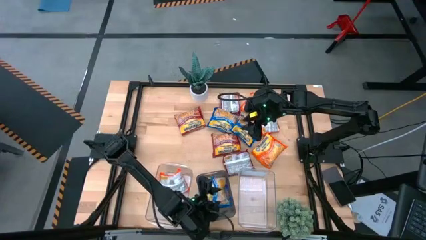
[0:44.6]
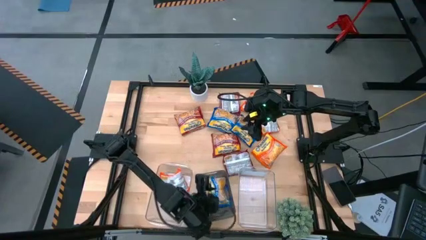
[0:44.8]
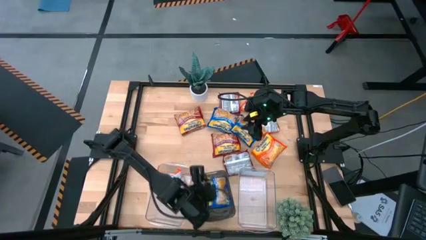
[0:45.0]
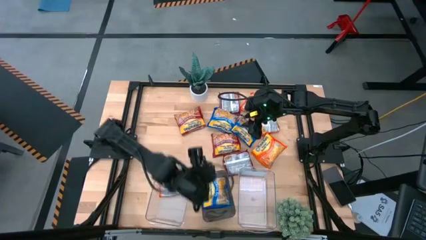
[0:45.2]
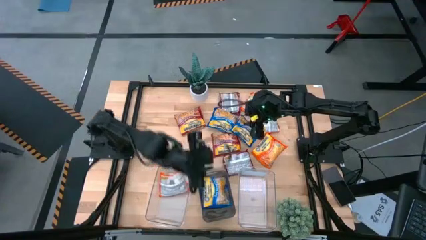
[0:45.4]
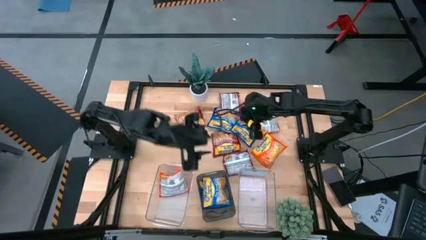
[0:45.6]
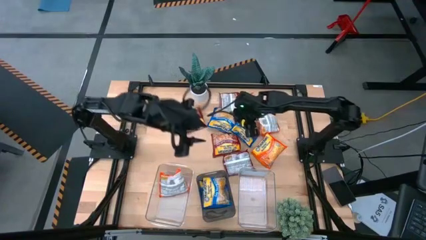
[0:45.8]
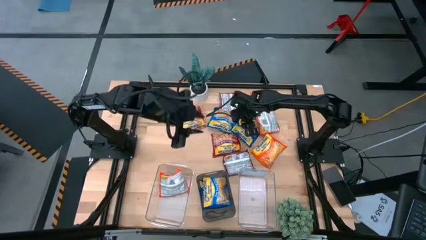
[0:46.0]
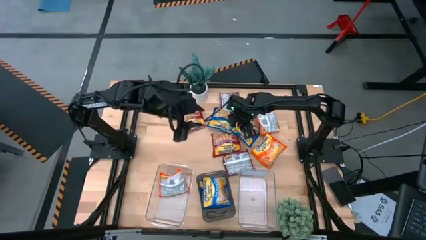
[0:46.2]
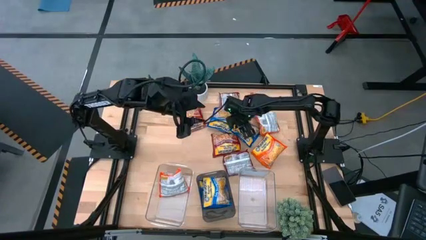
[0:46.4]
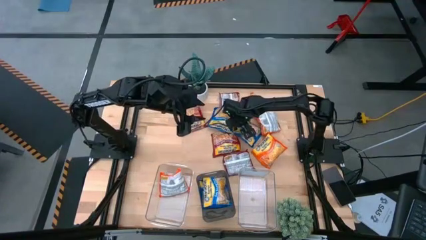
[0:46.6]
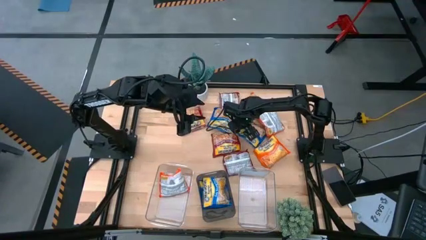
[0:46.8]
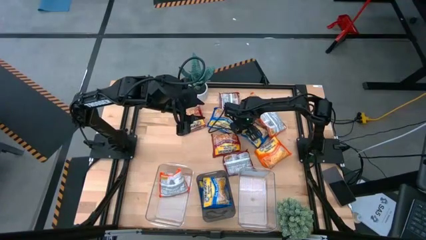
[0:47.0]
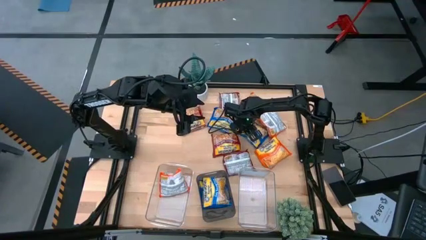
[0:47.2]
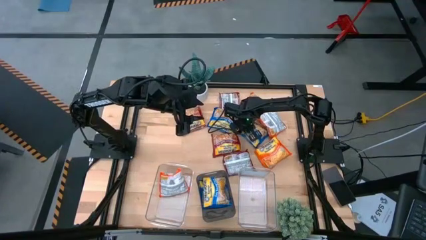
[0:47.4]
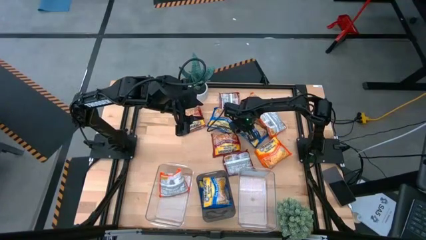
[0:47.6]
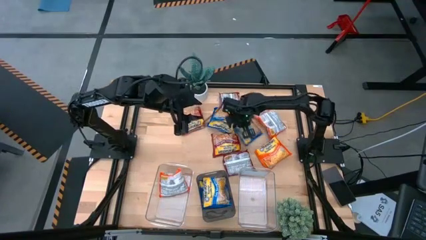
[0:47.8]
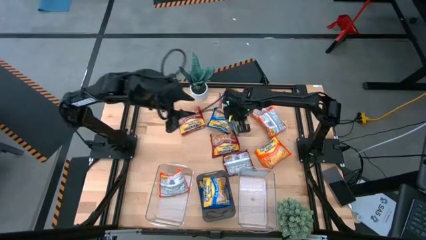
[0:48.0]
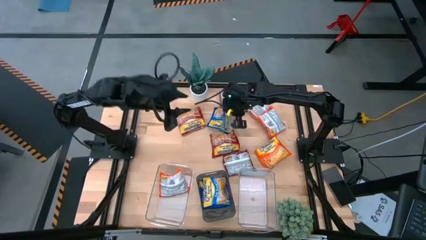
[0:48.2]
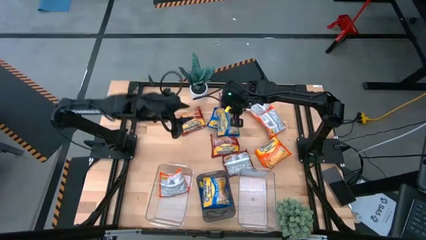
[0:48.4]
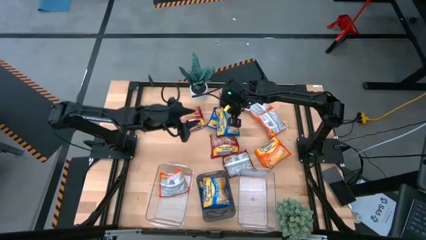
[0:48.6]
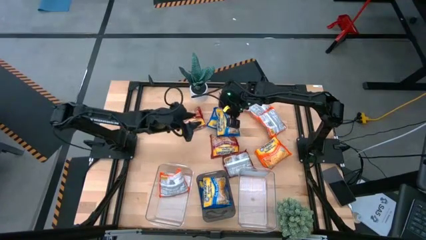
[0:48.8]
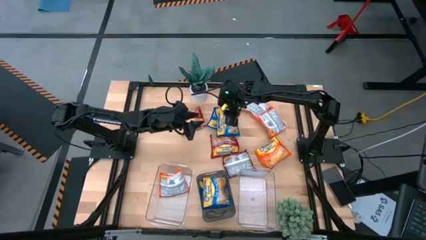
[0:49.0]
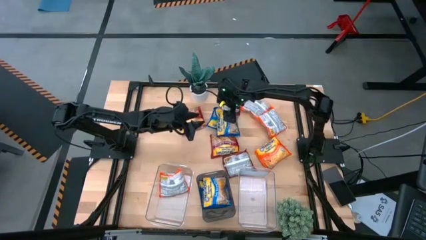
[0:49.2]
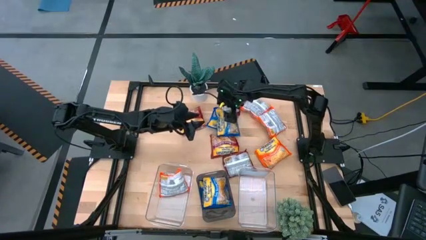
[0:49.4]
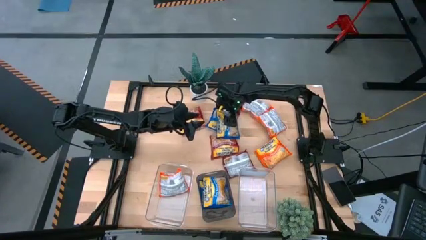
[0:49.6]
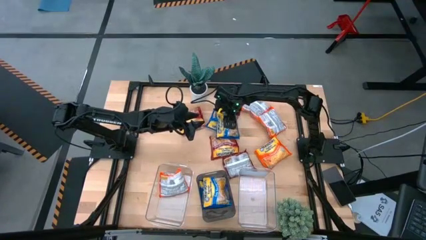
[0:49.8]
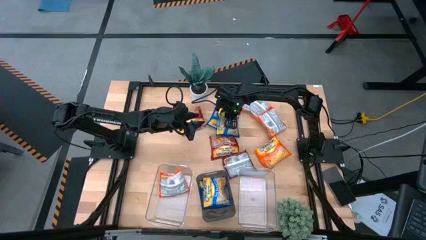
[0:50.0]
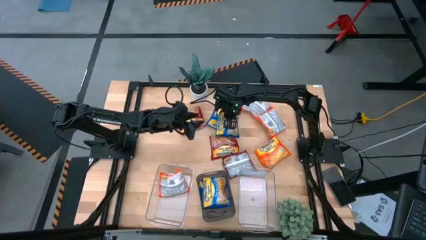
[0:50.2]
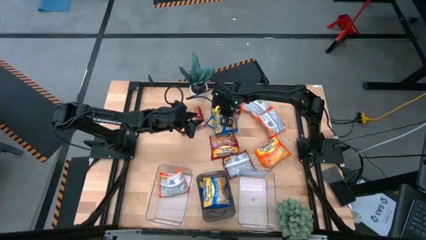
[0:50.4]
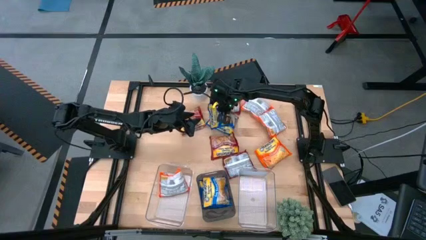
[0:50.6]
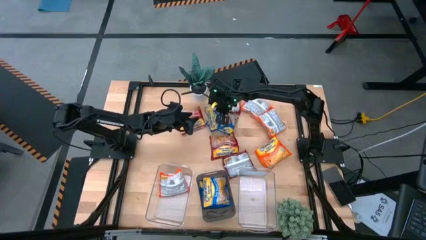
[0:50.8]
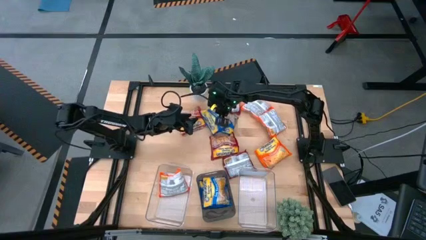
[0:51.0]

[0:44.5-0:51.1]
Task: Sort Maruchan noodles
Put the blue noodle pack into the black bin

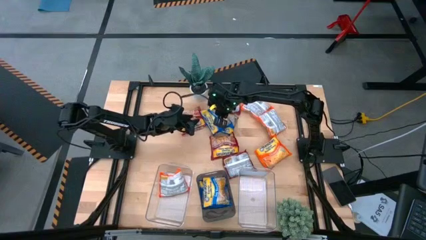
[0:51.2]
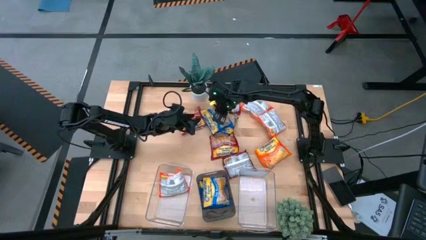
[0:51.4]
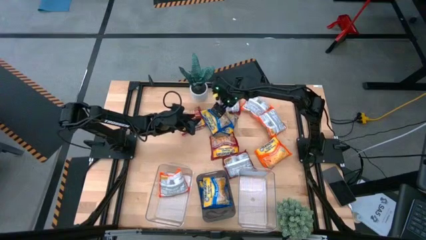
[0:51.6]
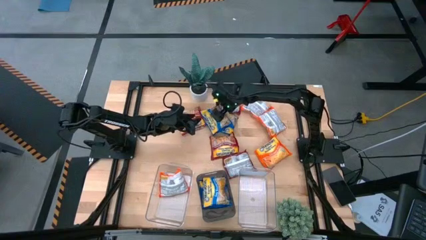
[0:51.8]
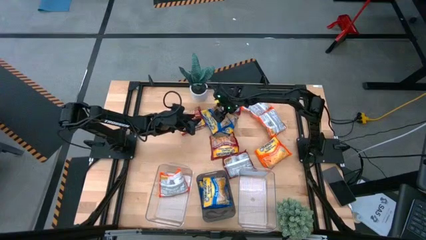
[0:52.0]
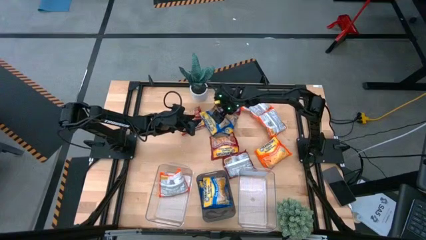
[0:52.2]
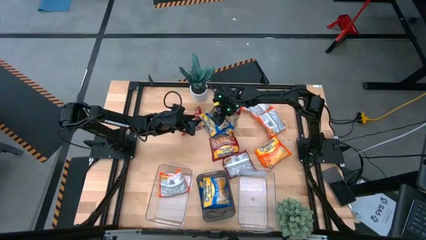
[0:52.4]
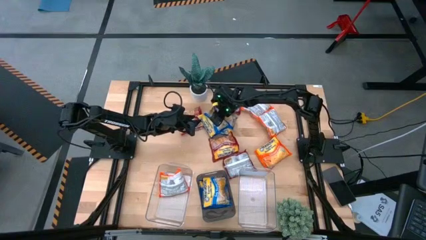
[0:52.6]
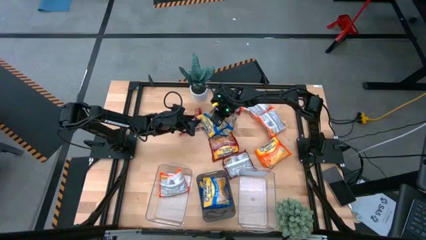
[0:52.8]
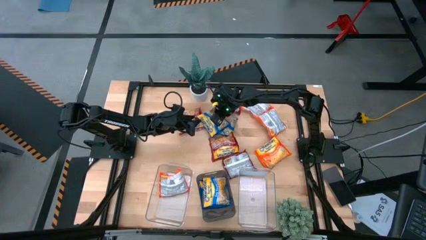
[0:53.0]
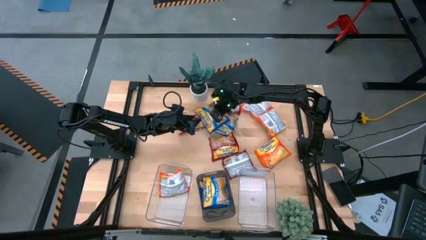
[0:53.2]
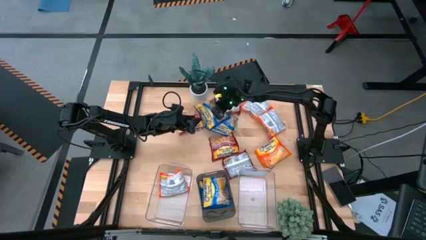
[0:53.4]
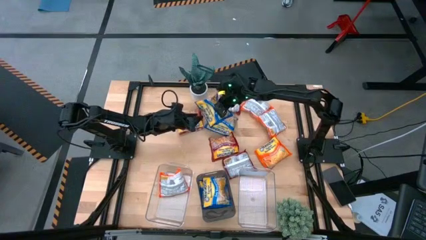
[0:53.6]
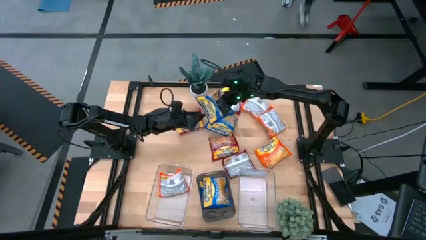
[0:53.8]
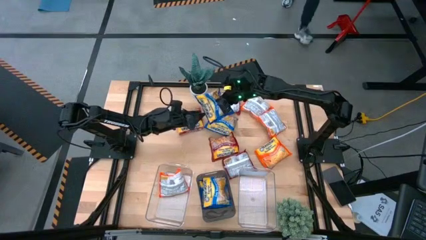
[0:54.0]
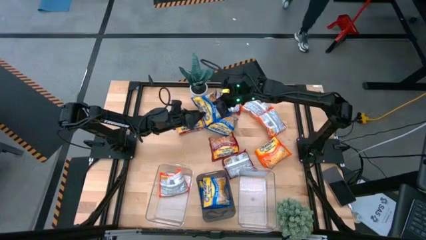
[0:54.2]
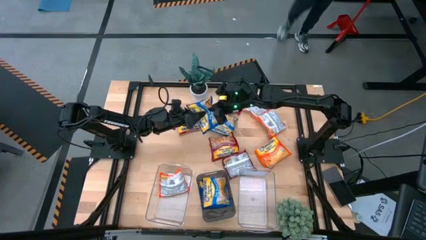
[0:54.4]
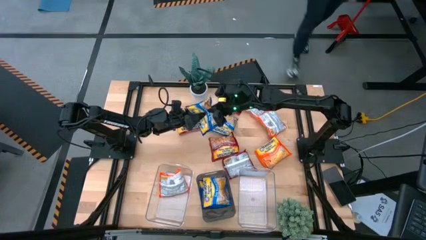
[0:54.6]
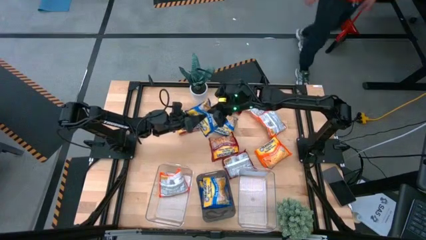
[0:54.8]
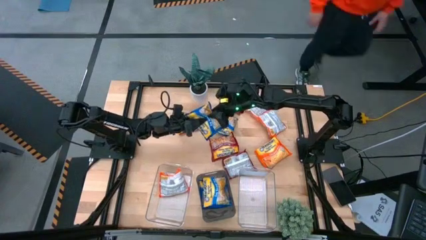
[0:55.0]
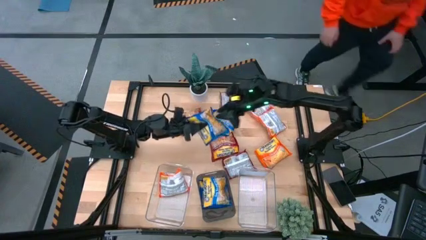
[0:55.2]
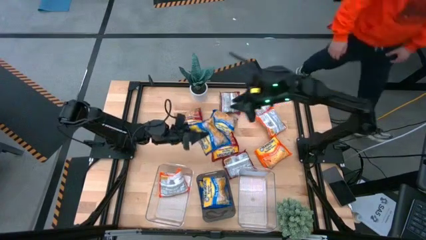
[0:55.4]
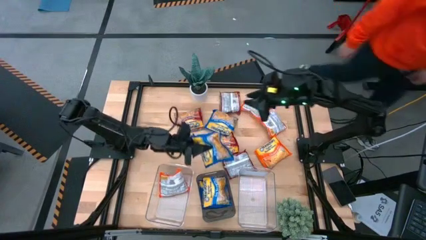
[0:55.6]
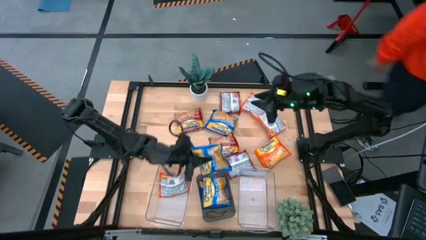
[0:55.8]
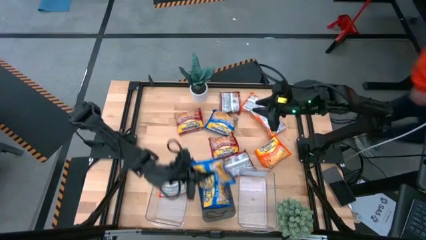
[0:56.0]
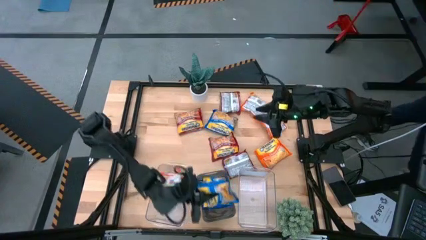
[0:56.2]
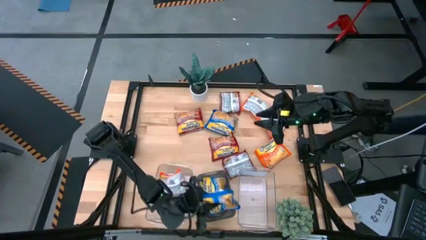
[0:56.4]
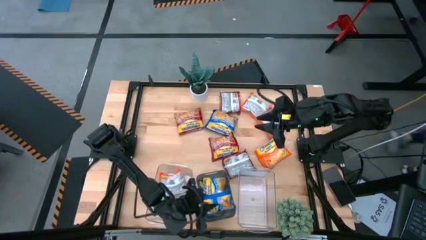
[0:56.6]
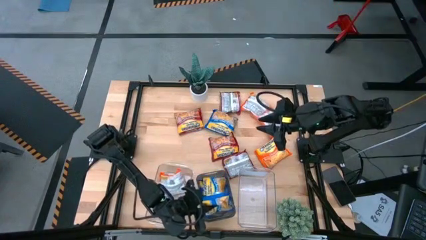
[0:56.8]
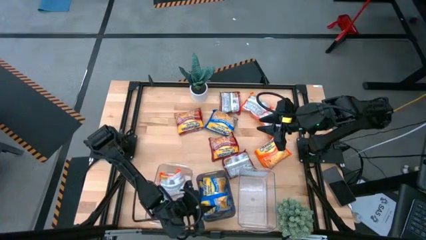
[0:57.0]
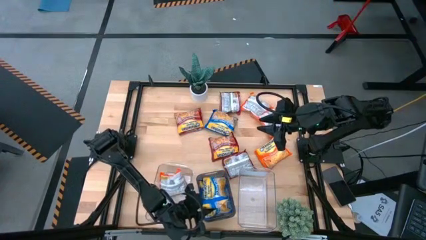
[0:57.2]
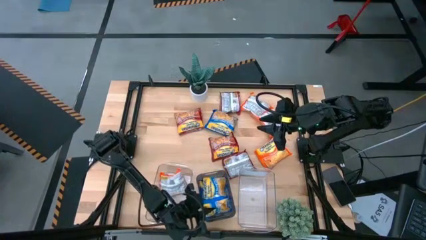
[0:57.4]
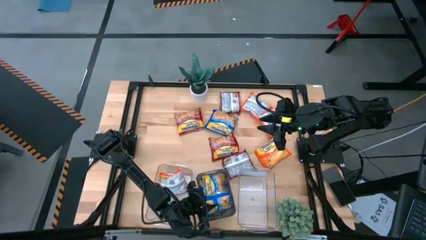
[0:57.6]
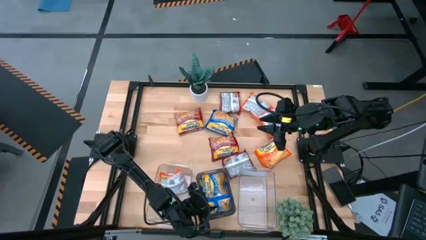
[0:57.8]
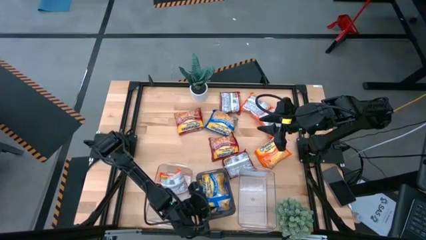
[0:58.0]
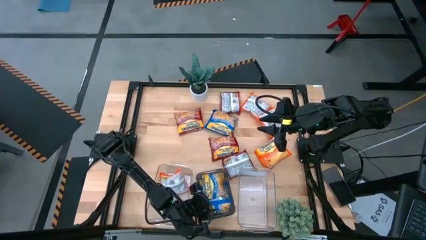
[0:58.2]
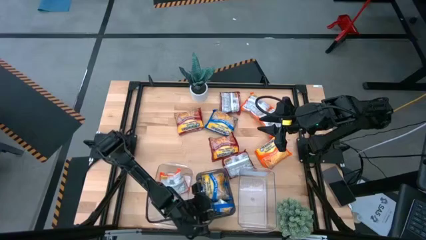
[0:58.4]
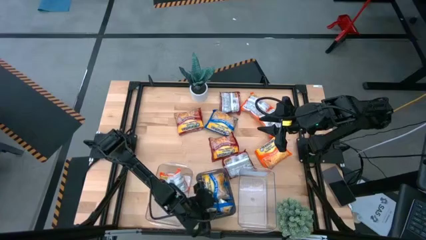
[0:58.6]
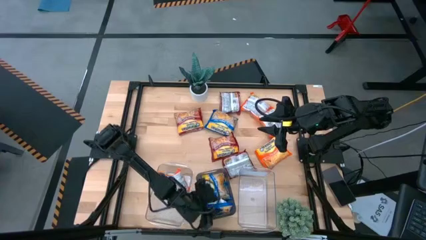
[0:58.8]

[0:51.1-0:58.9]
Put the blue noodle pack into the black bin

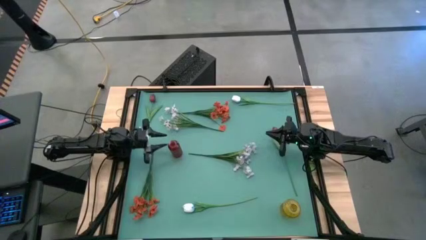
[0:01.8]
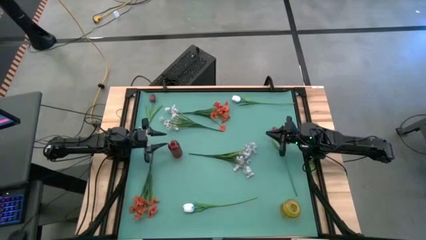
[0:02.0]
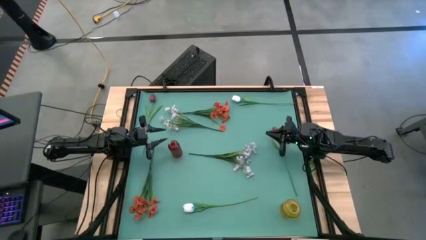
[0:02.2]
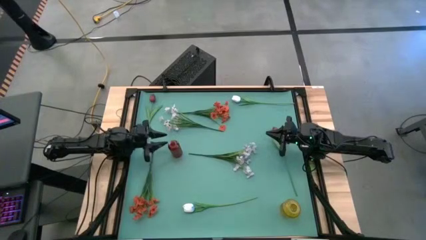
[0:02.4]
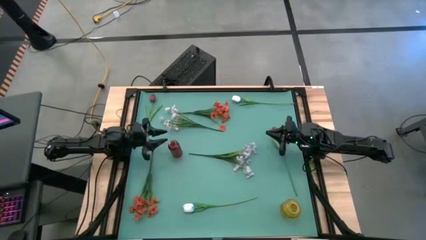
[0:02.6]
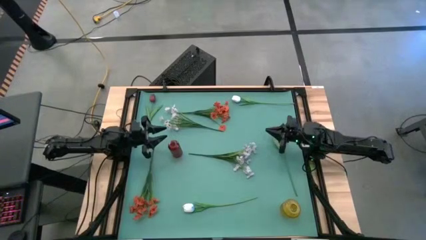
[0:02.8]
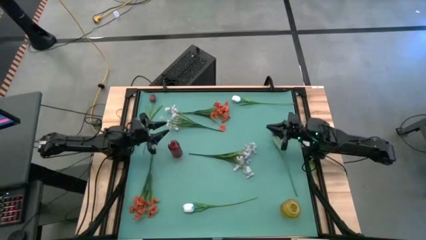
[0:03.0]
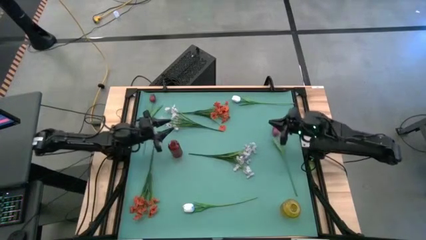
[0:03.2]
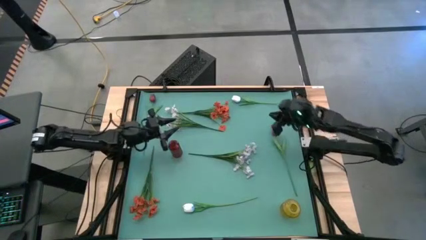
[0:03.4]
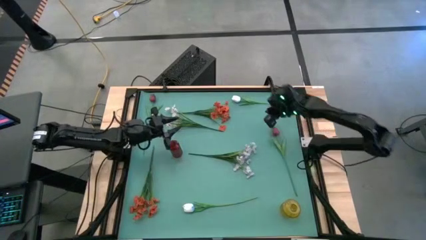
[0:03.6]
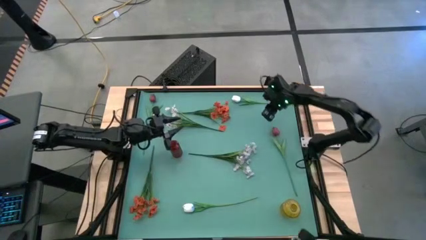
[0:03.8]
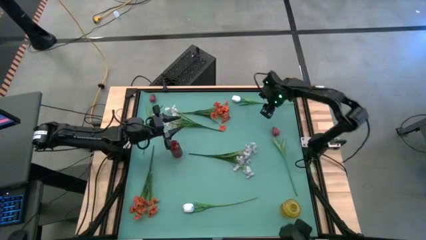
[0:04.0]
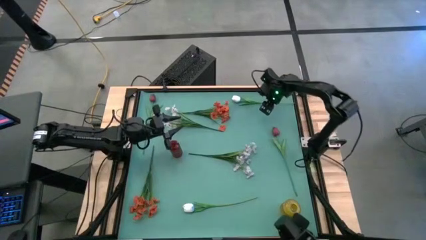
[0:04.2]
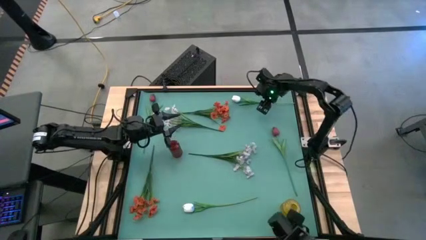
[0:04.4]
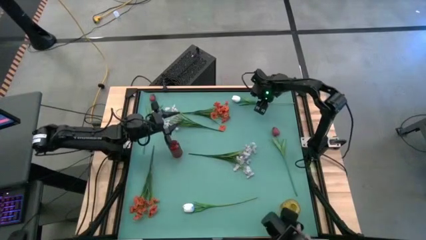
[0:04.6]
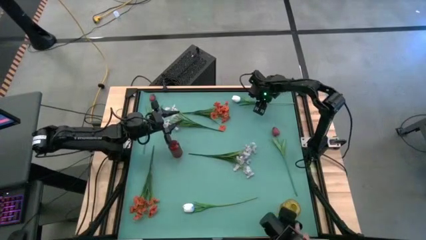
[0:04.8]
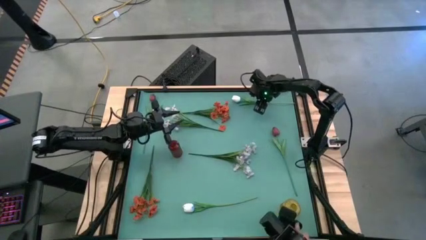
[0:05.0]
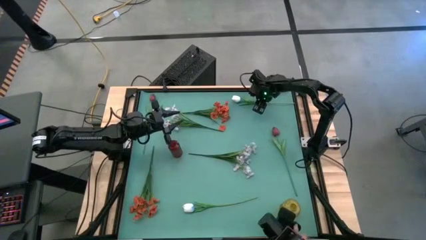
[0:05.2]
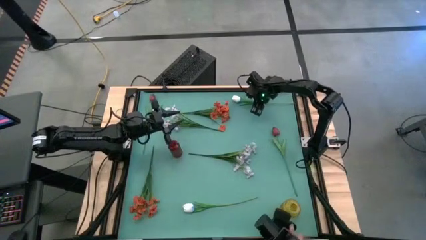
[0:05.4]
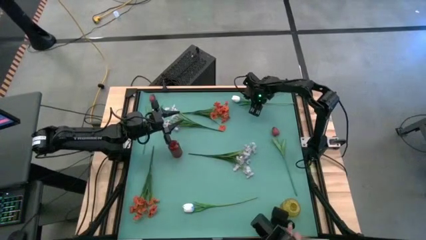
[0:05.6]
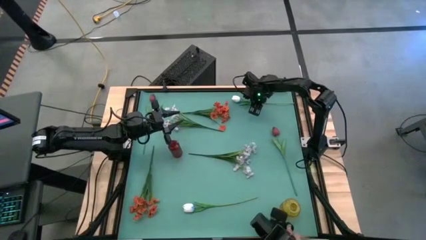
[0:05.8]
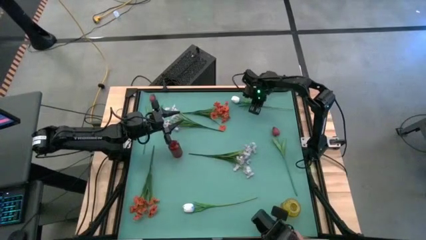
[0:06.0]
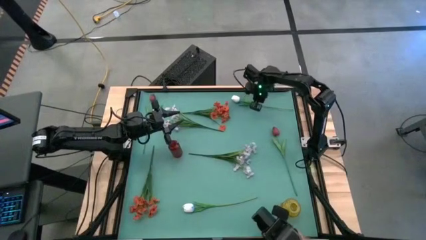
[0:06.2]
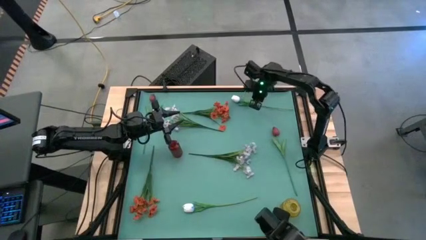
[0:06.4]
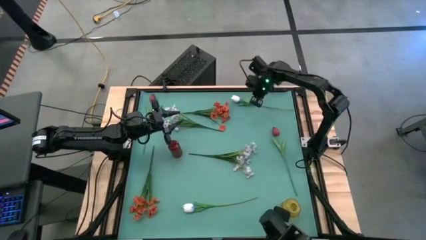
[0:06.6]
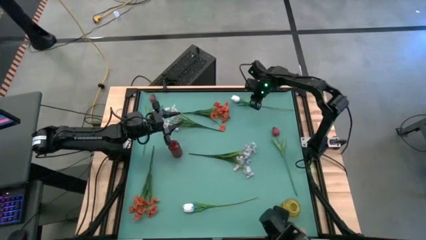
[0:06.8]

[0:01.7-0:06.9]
Task: Sort flowers into vase by color
Put the top white flower into the yellow vase
